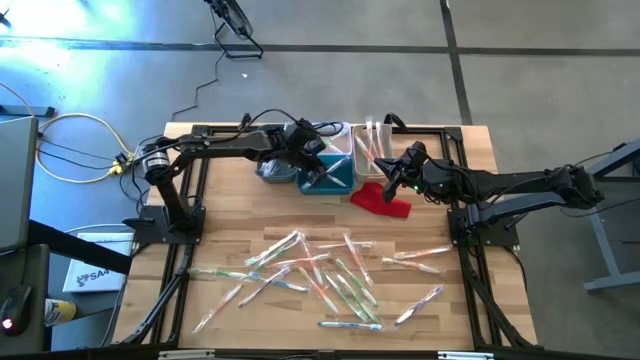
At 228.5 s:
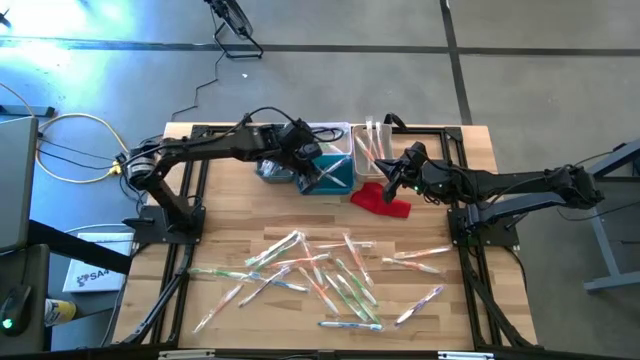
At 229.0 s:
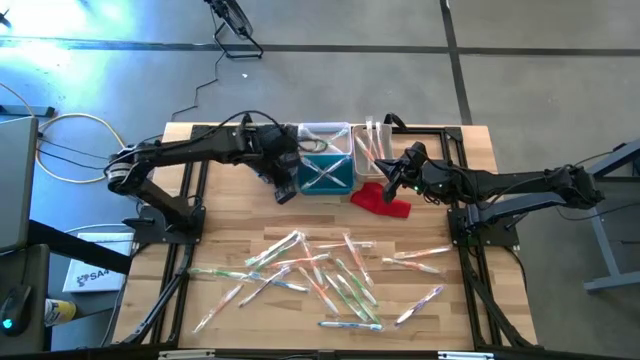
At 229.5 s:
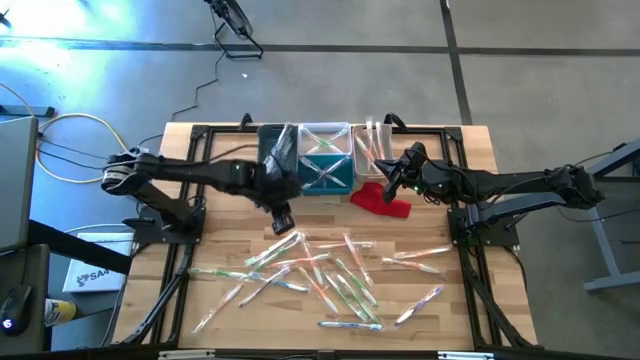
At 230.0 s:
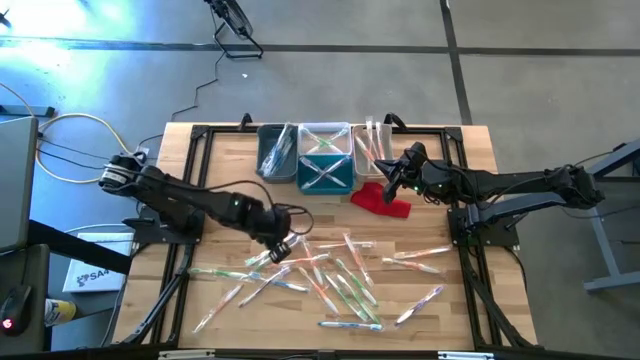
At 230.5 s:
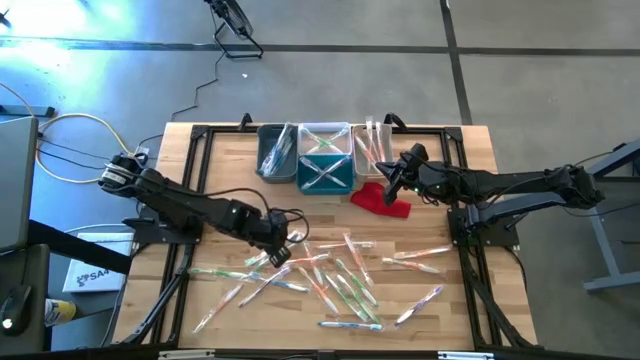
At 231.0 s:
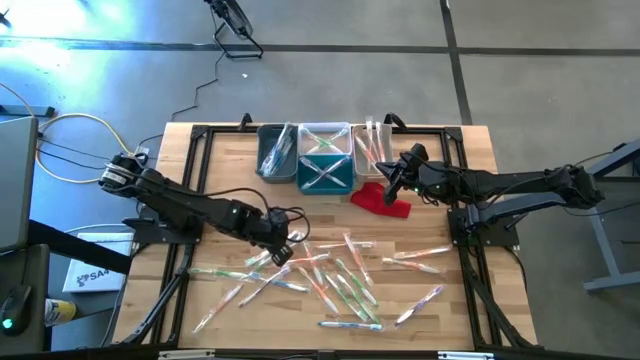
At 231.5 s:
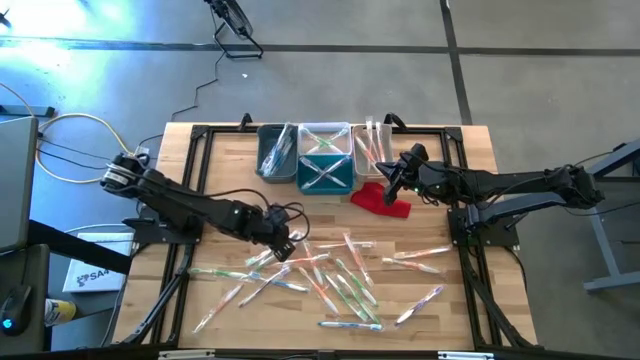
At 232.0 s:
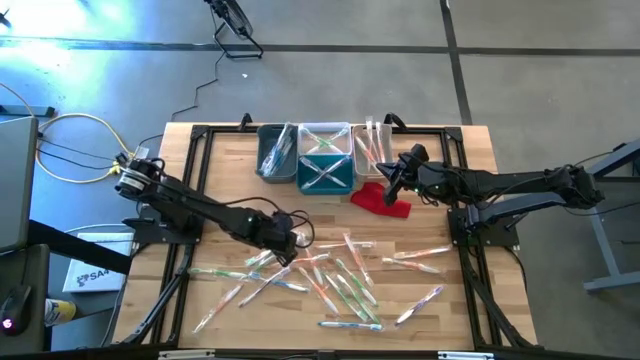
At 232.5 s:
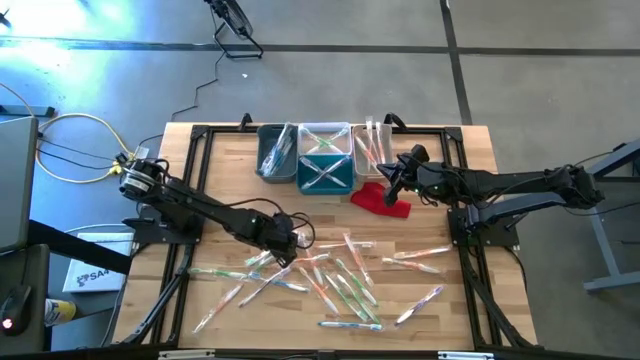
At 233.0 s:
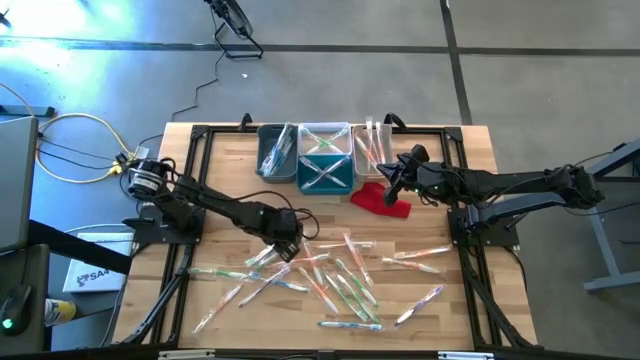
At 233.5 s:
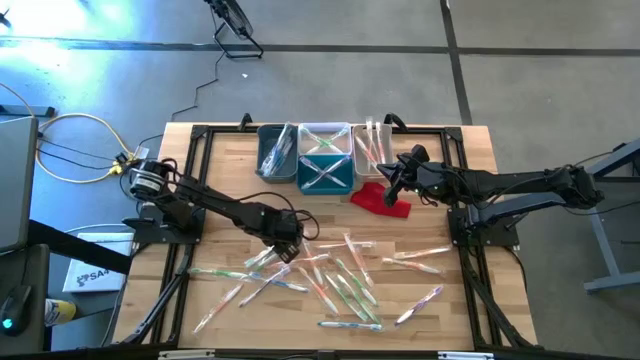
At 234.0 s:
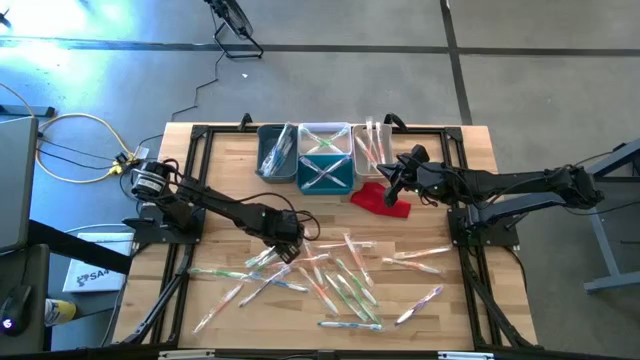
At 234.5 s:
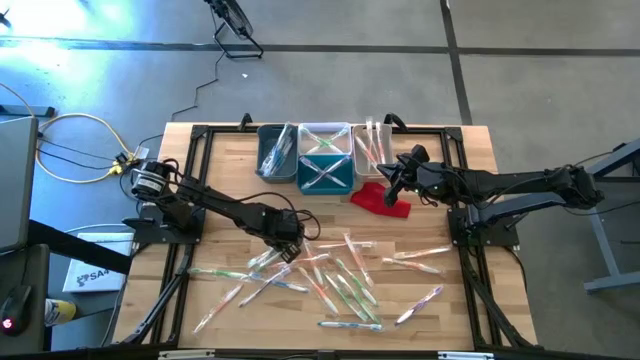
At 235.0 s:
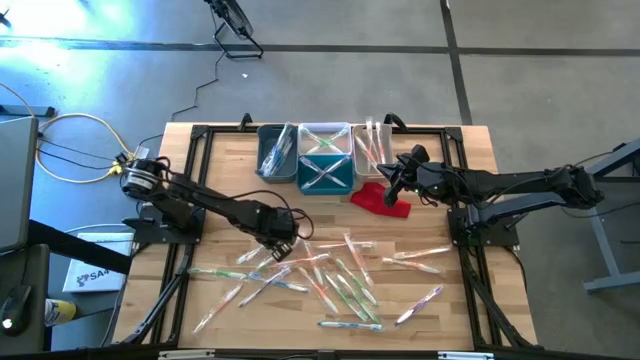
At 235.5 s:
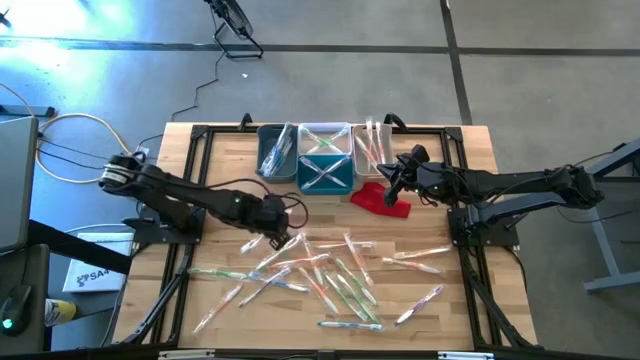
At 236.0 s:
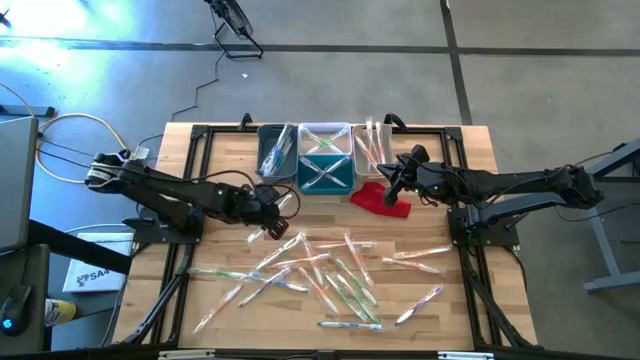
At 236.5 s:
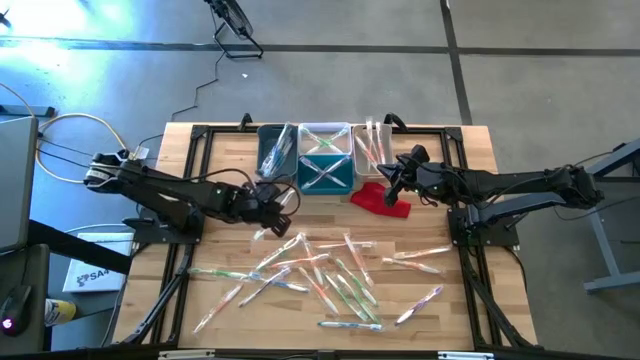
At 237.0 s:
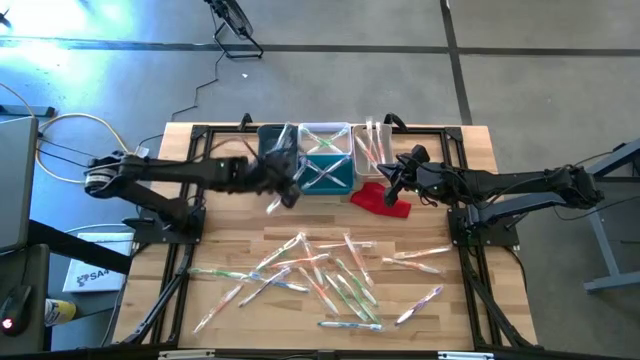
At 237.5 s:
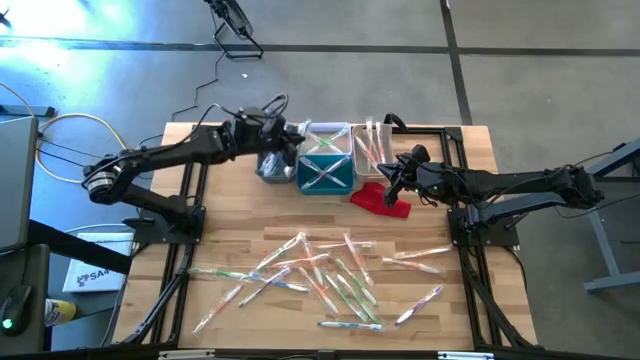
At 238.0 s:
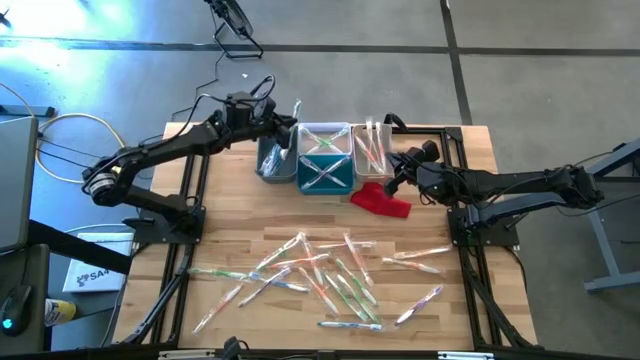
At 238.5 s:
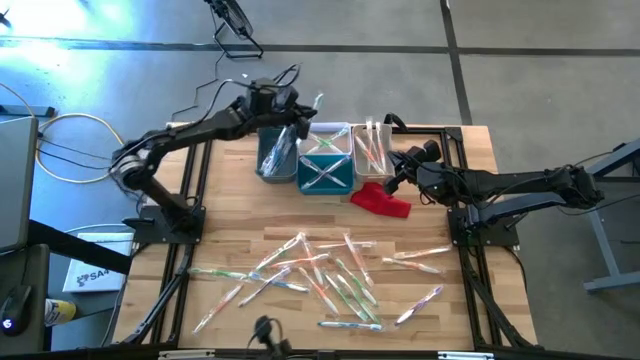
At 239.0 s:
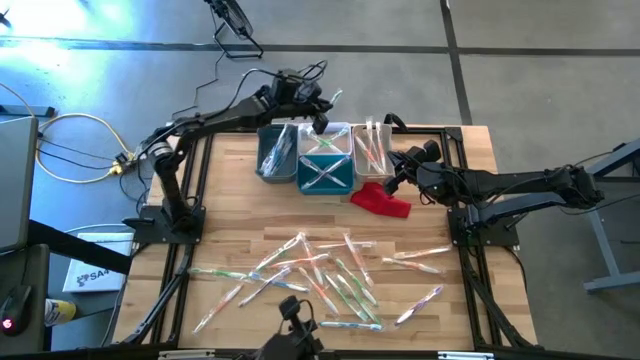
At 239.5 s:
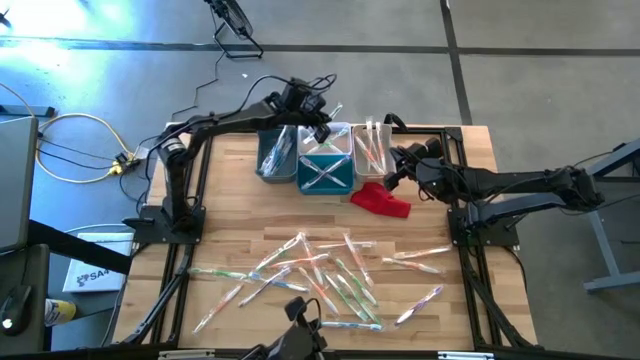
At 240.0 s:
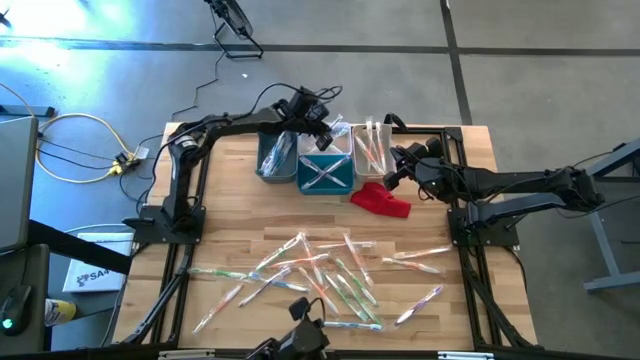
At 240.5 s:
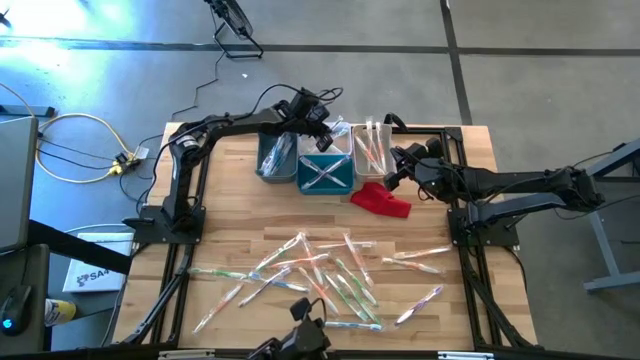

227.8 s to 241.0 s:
Task: Pick & Place Toothbrushes
Put the green toothbrush into the transparent bin

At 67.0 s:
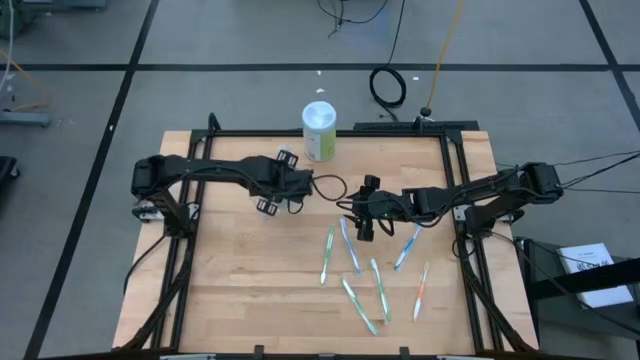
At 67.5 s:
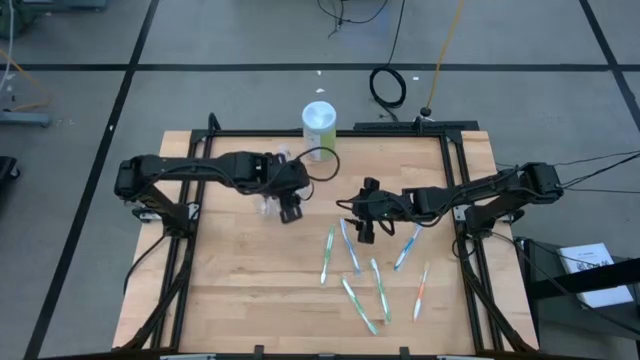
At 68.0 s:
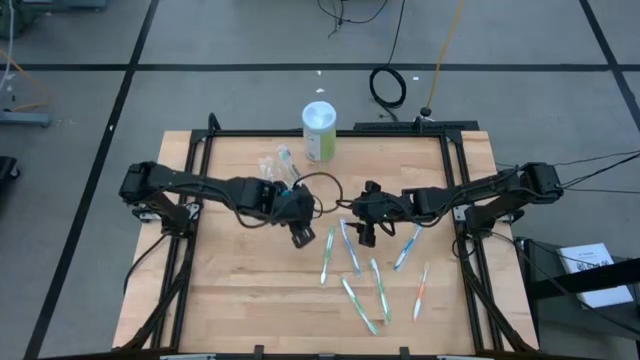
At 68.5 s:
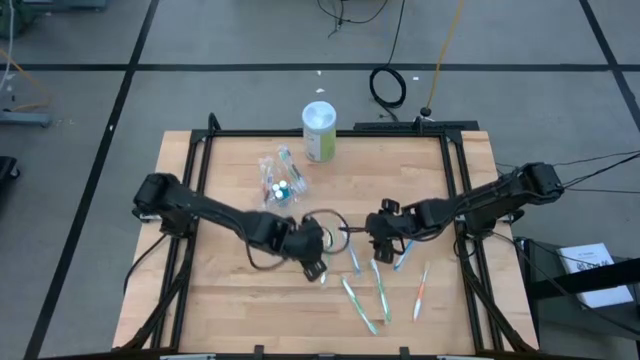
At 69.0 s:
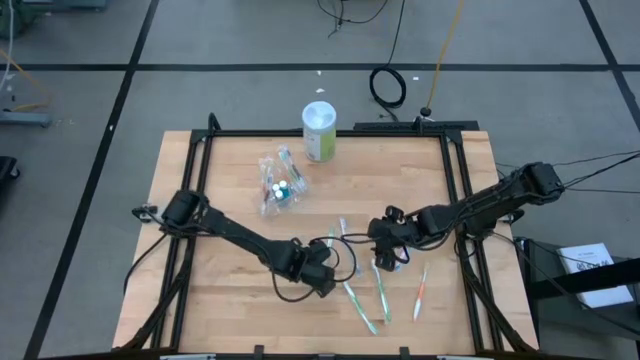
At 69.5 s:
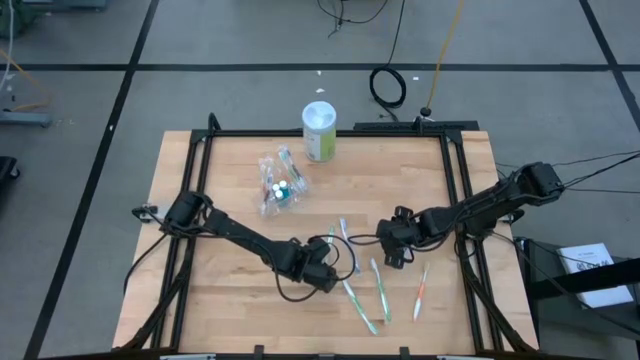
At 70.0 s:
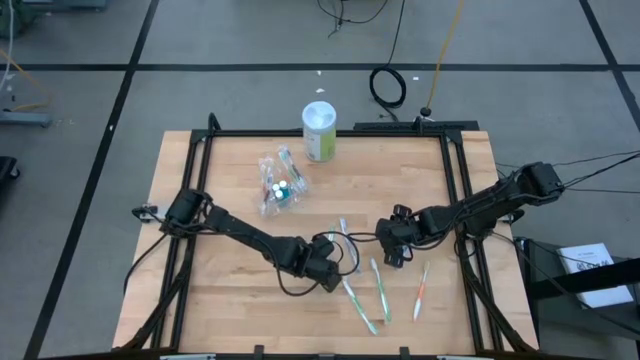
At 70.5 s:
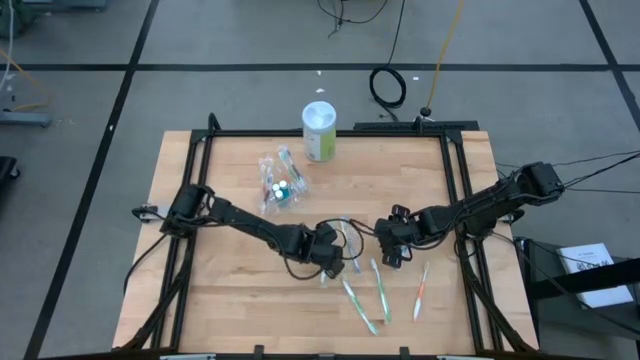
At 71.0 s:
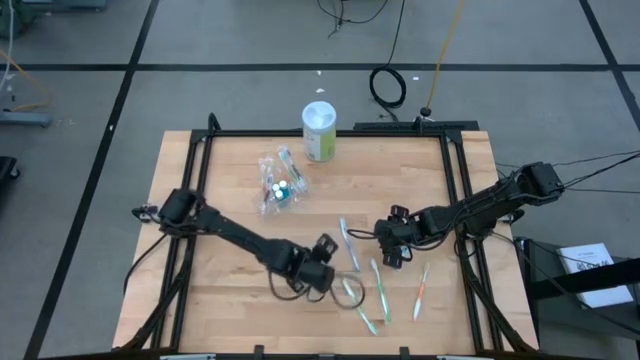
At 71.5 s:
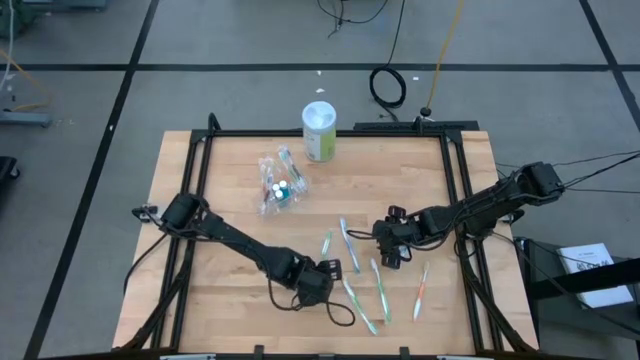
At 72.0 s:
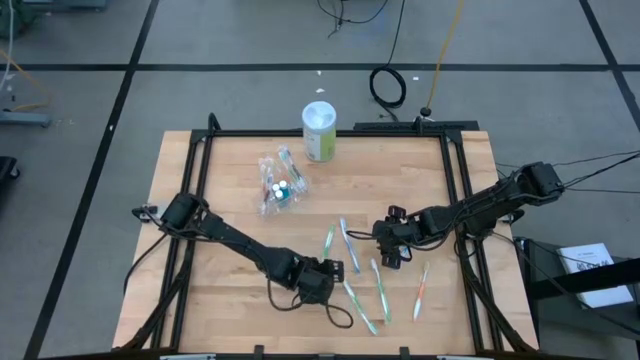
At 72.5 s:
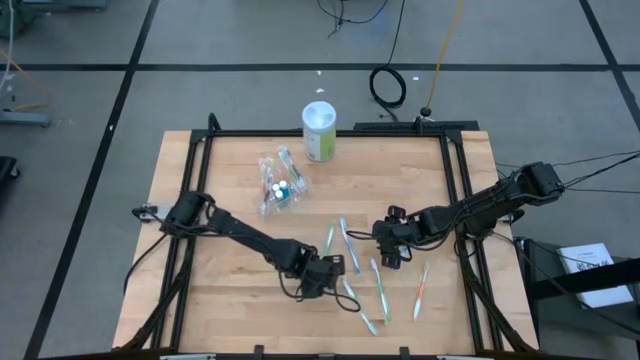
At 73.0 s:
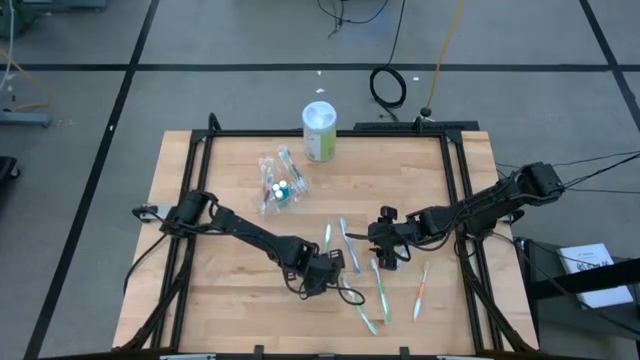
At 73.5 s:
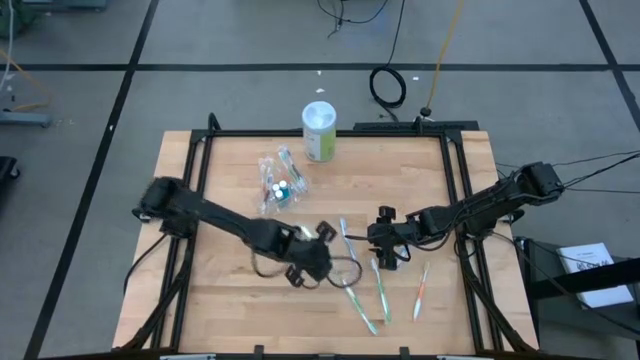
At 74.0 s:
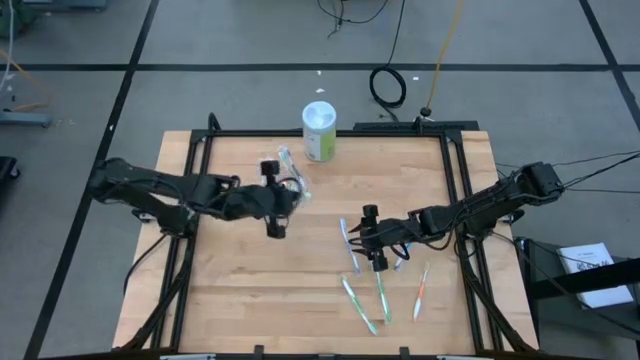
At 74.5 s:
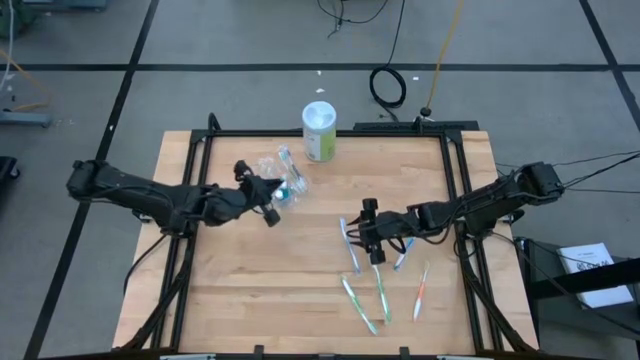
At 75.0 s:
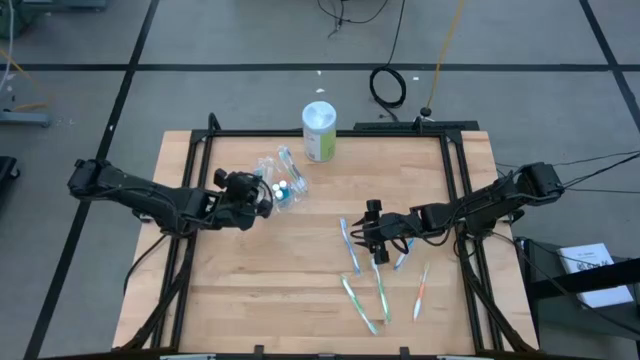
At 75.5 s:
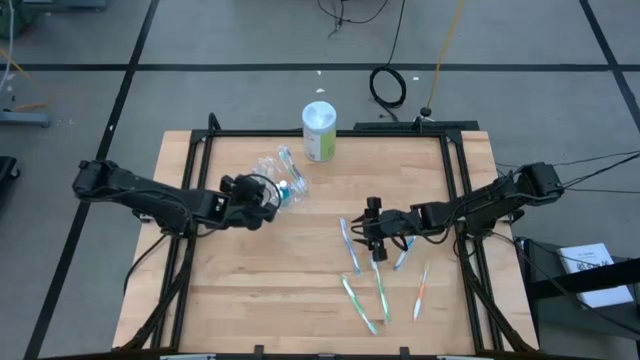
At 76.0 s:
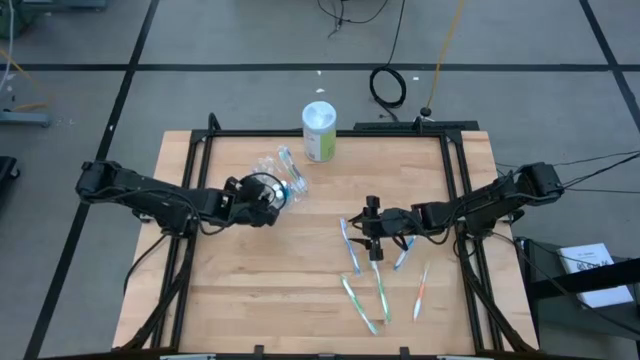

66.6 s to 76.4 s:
Task: Pick & Place toothbrushing station
Put the green toothbrush into the transparent organizer
